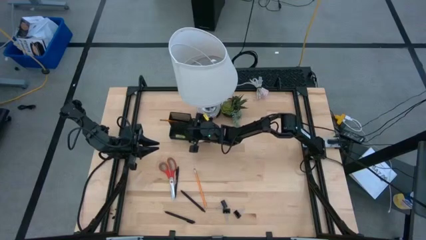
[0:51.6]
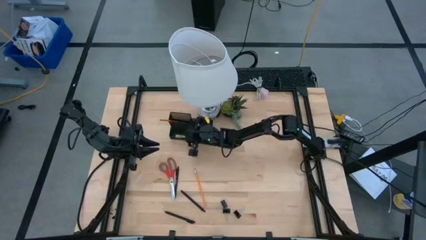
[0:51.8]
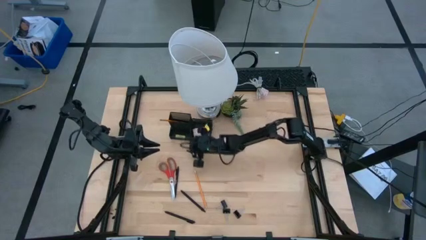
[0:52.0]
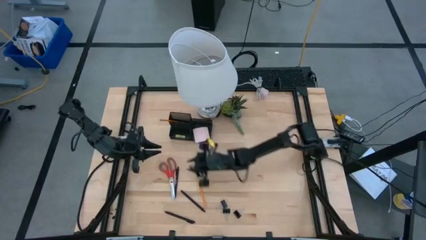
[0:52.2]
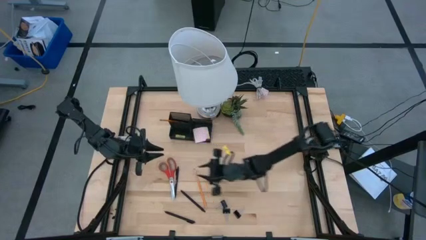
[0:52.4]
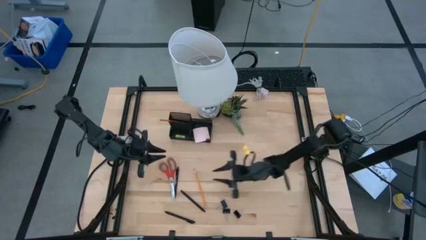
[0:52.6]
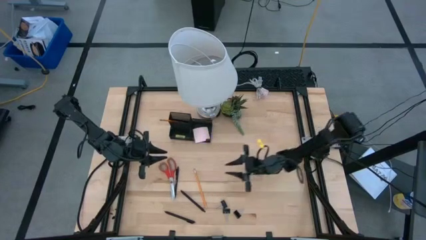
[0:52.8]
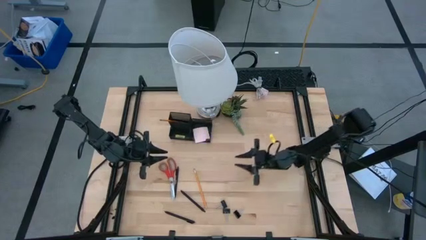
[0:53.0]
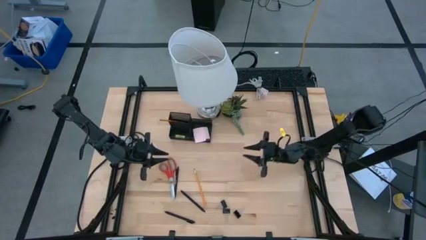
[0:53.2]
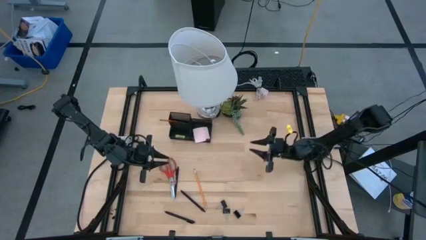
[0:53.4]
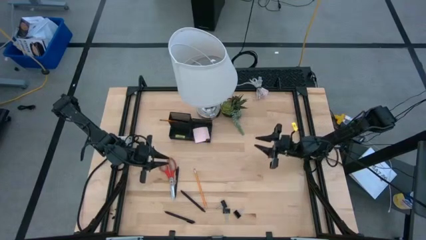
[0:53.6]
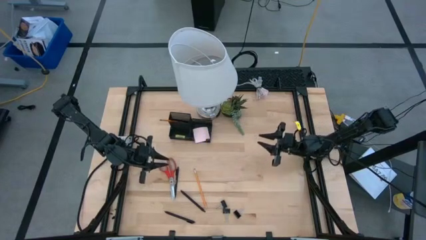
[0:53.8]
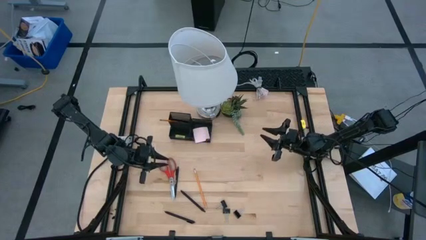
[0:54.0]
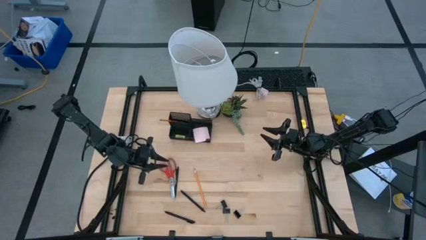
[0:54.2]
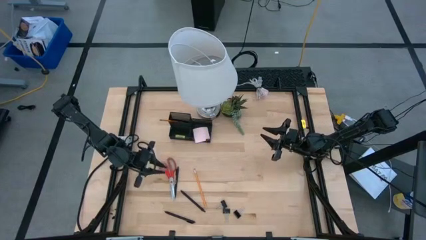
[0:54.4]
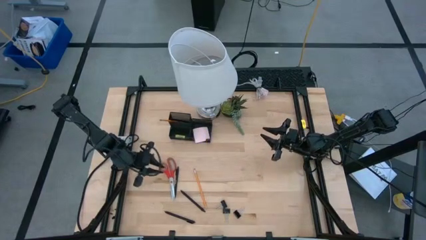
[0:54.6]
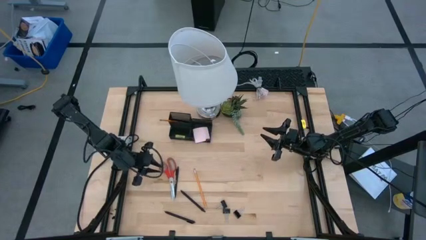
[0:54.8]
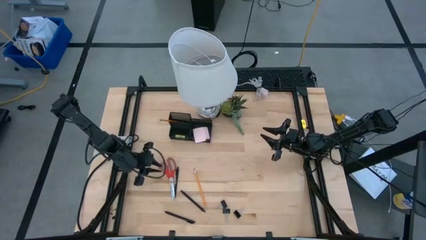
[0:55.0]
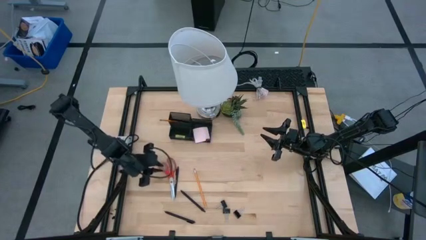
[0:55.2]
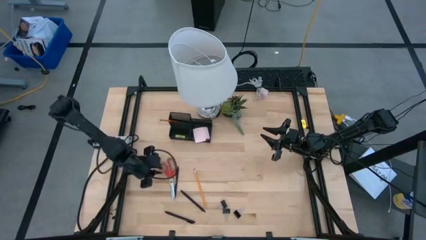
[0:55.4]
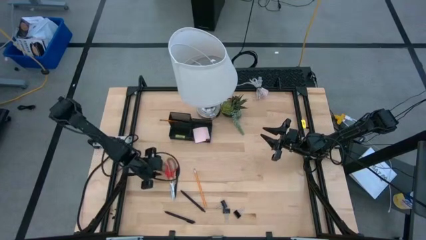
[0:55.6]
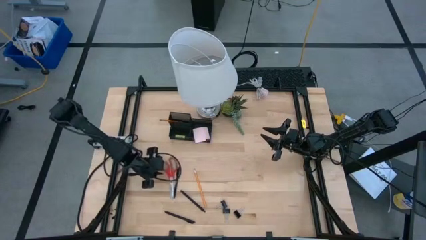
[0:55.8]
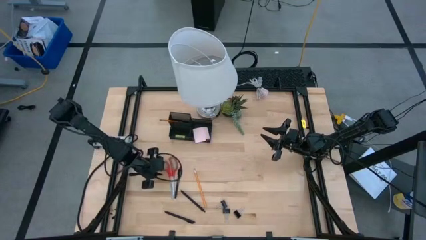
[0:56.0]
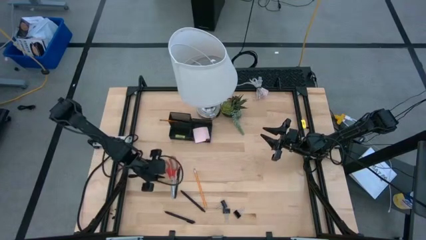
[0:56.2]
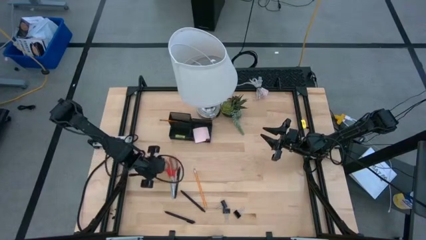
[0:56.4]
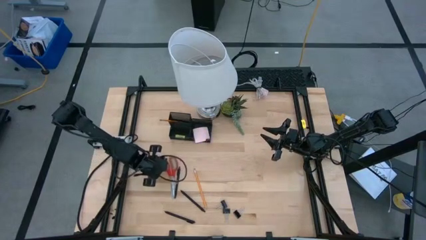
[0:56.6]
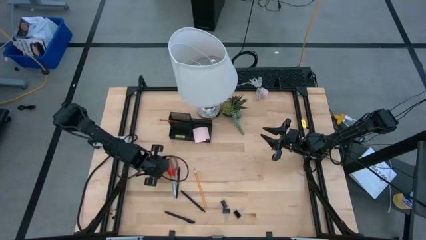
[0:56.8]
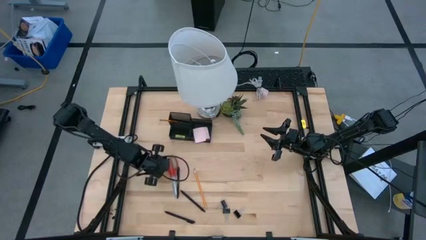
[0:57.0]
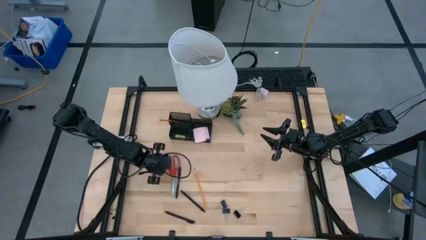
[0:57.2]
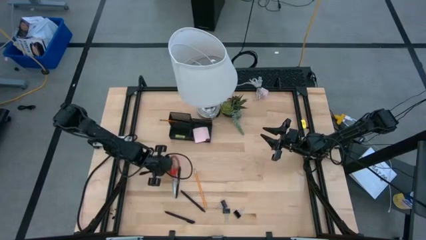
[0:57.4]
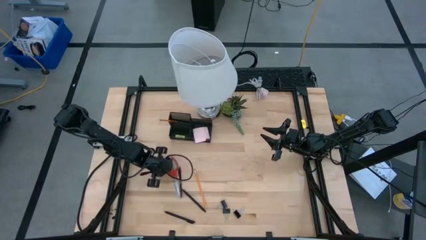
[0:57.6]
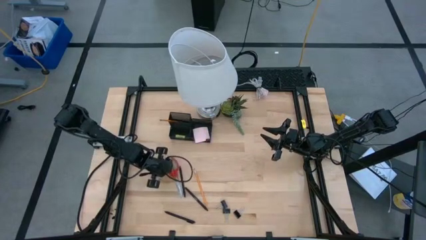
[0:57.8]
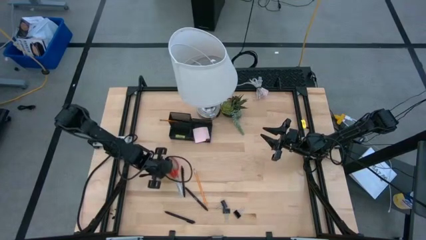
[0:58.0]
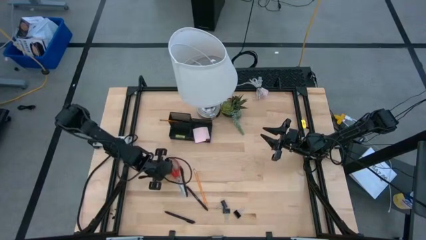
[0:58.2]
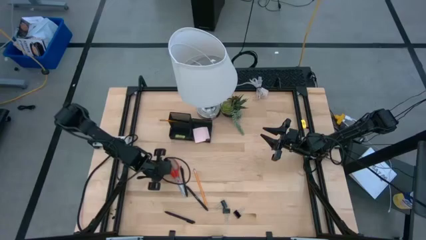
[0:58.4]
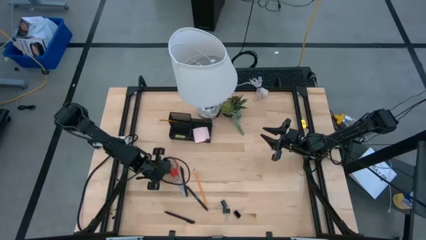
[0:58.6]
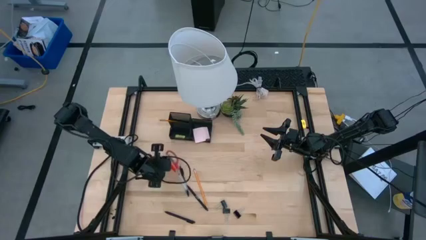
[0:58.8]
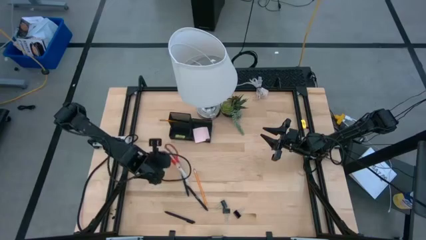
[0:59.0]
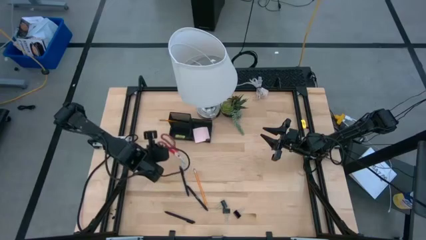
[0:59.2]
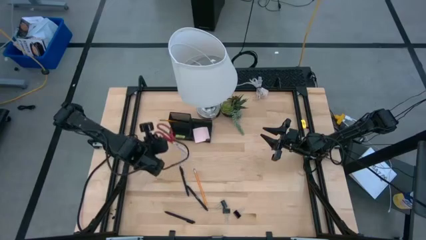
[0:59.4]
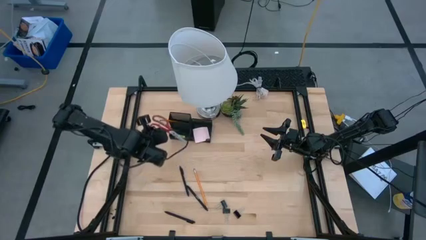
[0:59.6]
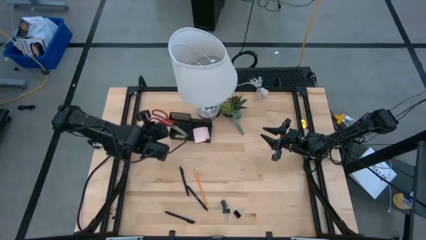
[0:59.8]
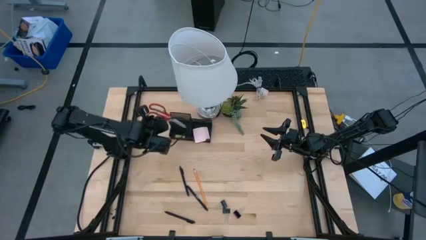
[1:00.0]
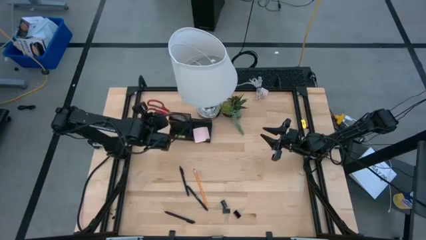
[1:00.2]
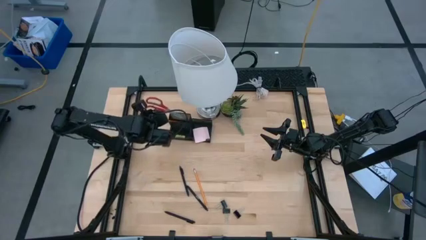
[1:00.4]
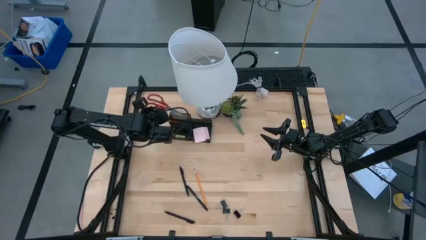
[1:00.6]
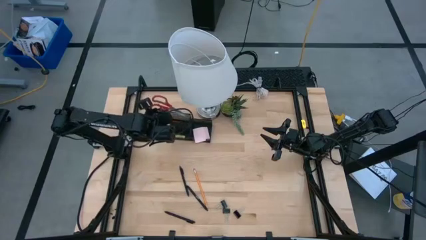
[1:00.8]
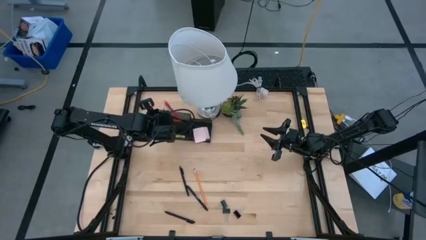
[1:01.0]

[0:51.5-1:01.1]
Task: Pick and place office supplies into organizer
Put the red scissors into the black desk organizer

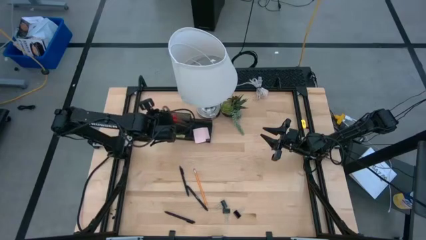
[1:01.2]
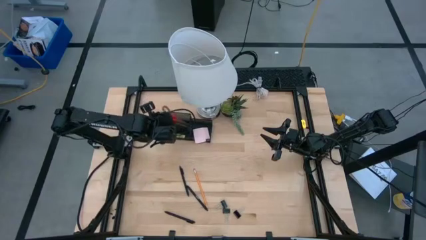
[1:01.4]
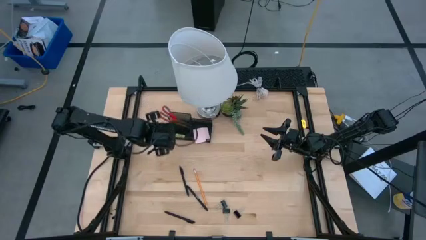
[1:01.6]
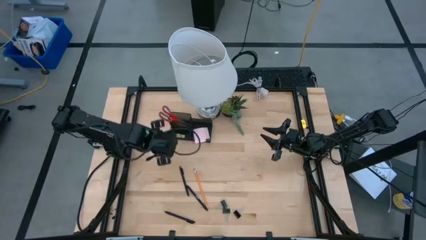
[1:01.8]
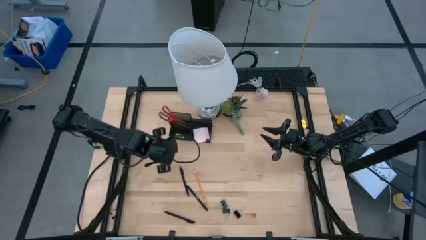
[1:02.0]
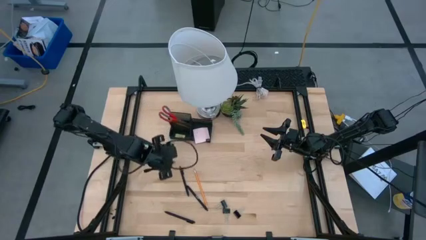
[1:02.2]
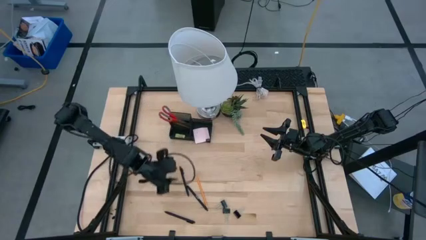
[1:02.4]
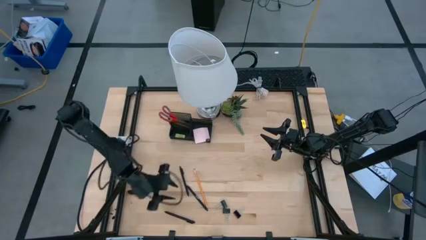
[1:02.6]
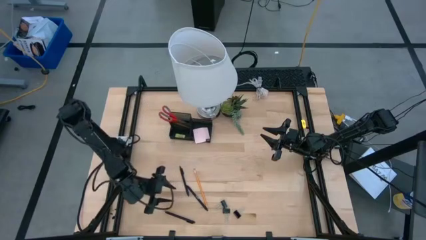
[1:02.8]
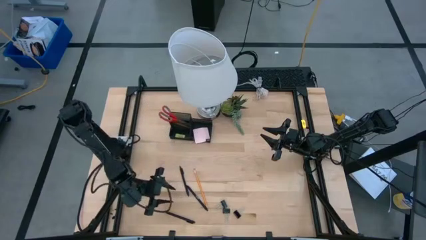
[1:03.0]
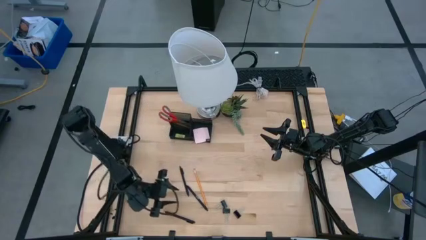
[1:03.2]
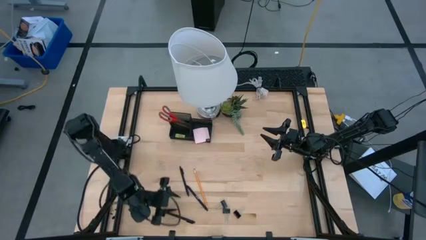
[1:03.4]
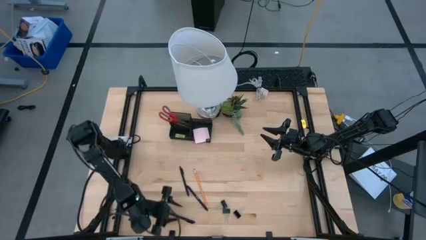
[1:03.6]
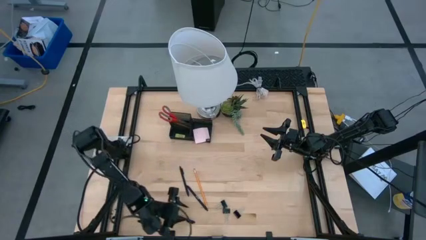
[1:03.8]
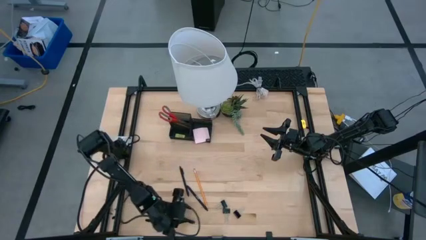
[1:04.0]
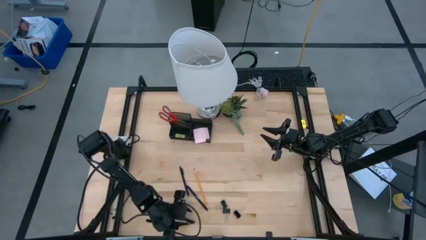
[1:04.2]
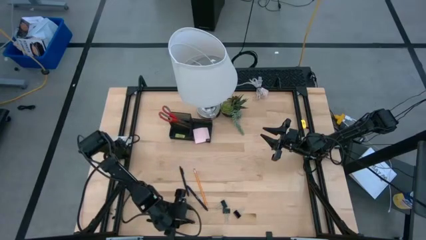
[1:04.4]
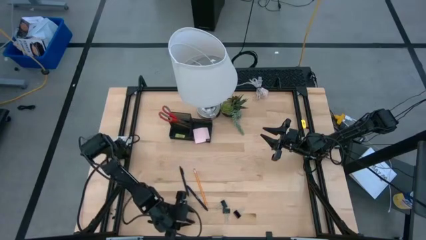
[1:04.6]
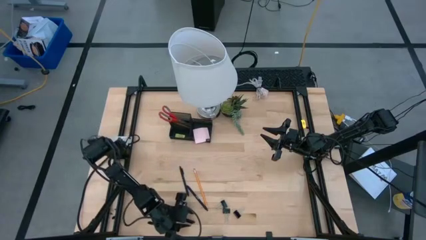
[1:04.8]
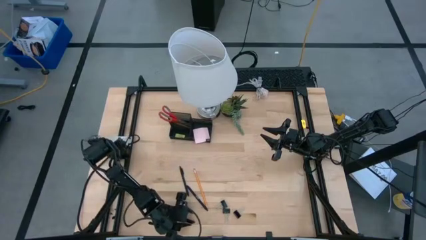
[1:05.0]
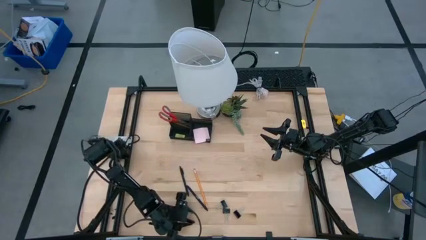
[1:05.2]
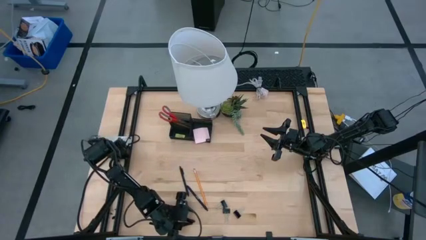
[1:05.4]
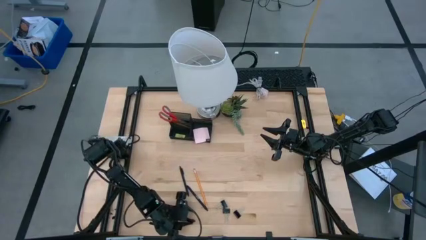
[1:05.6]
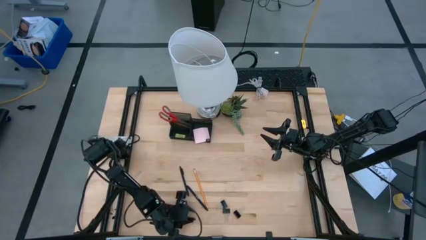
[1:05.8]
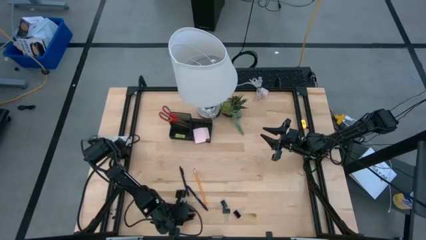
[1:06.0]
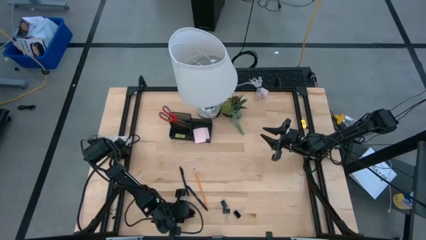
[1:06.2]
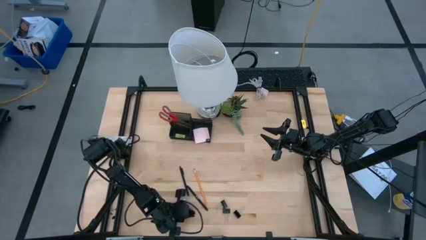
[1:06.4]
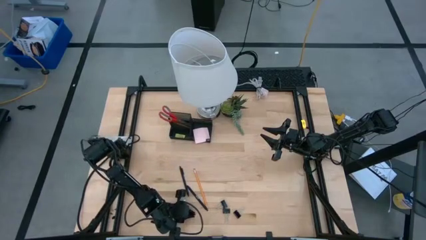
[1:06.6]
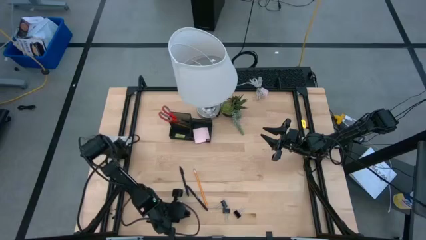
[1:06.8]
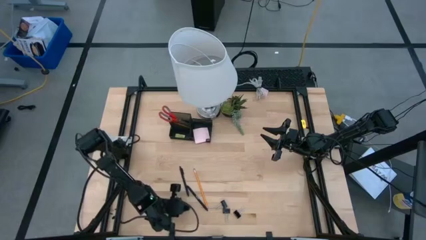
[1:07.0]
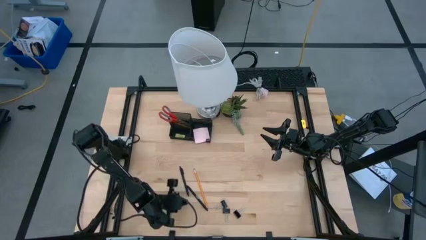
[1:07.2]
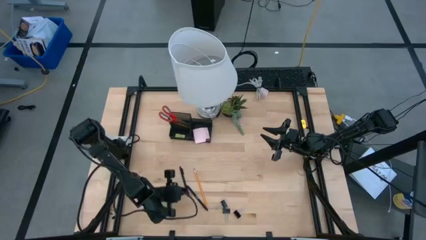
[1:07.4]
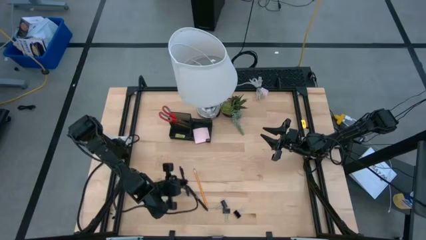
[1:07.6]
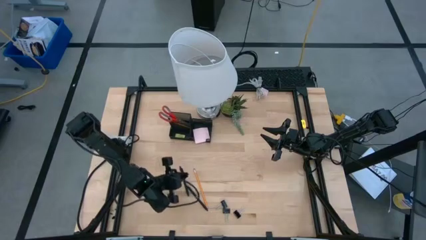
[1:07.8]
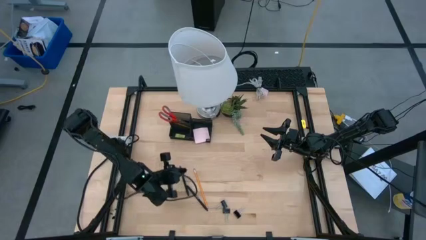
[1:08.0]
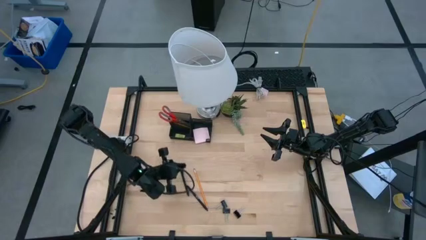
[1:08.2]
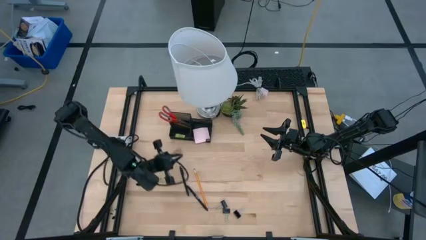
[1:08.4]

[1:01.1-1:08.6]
Put the black pen into the black desk organizer
